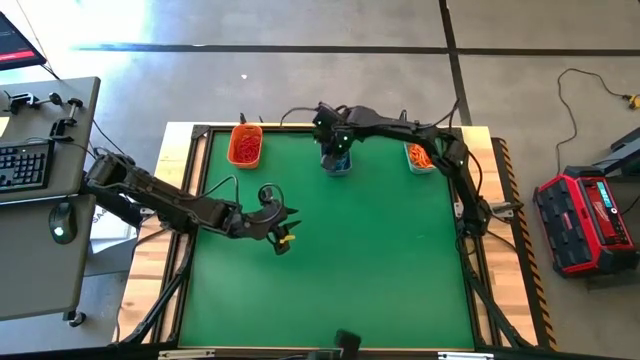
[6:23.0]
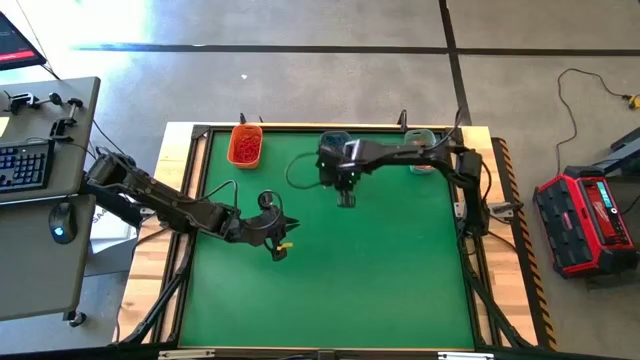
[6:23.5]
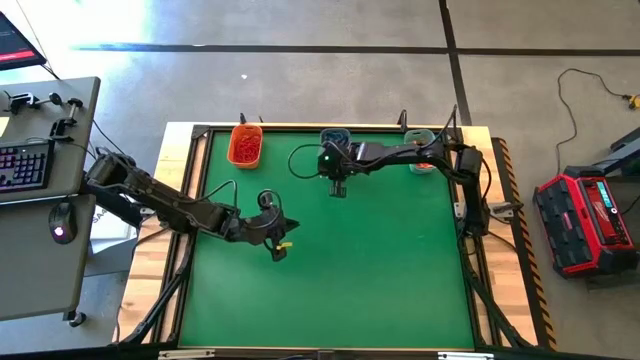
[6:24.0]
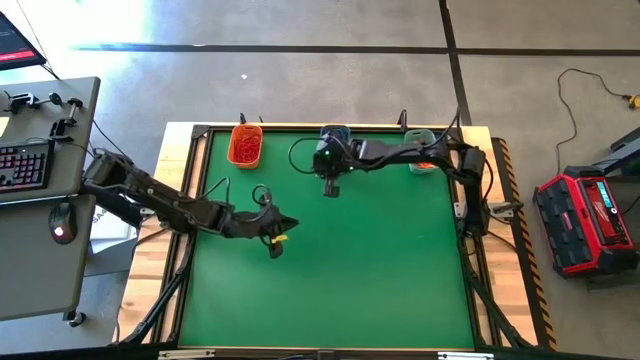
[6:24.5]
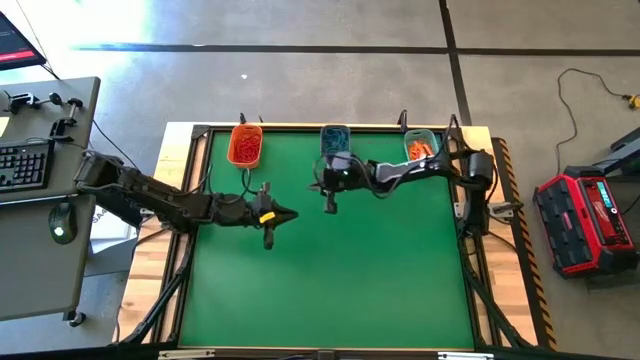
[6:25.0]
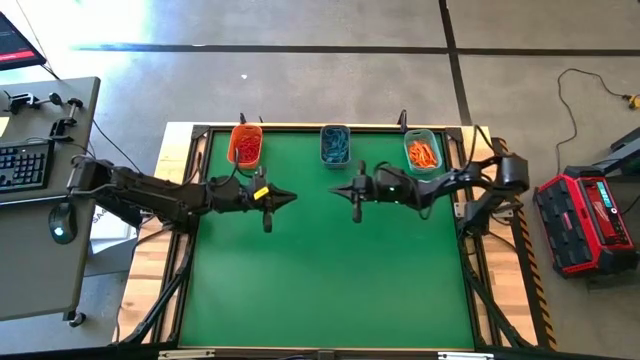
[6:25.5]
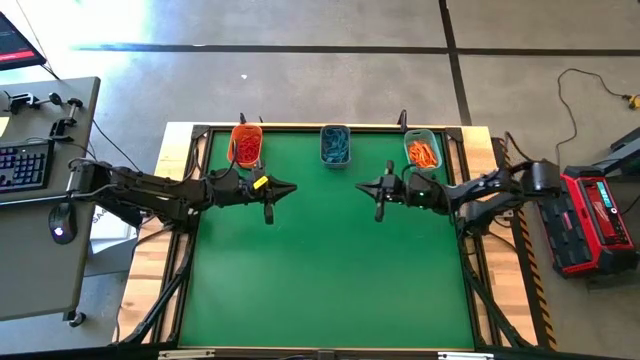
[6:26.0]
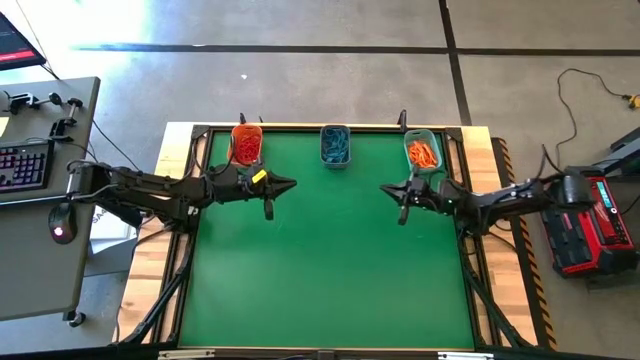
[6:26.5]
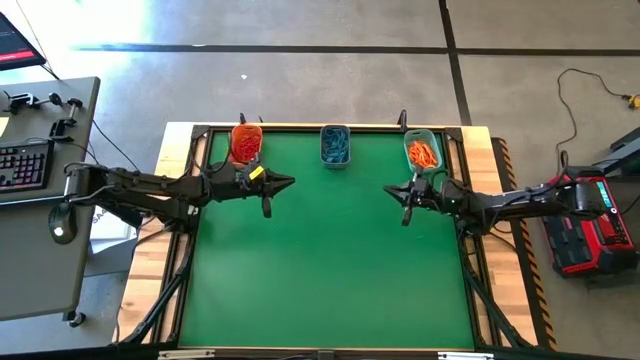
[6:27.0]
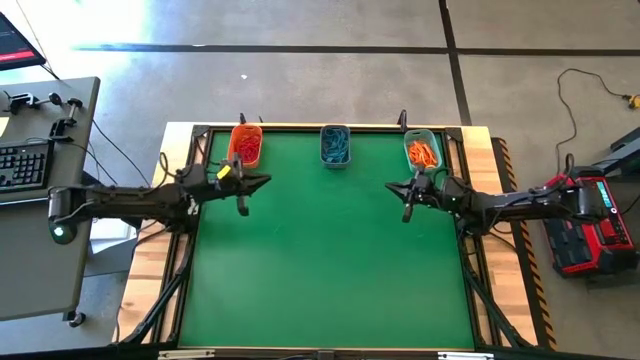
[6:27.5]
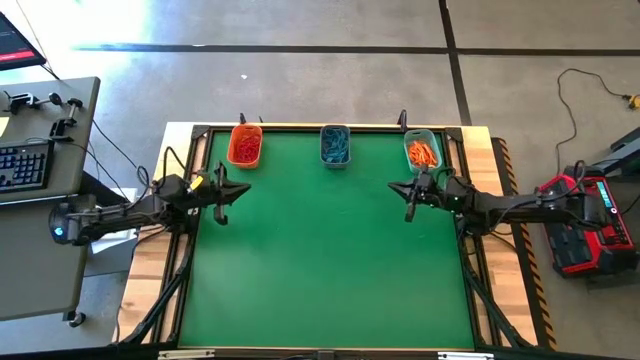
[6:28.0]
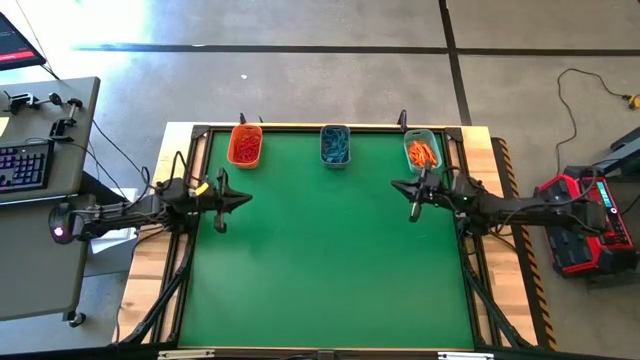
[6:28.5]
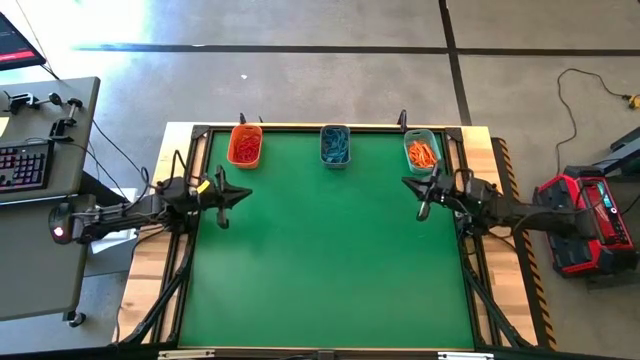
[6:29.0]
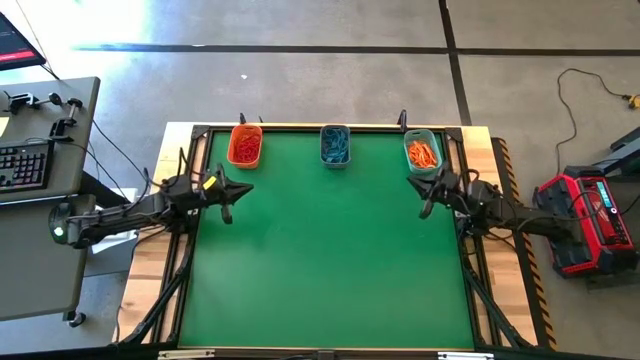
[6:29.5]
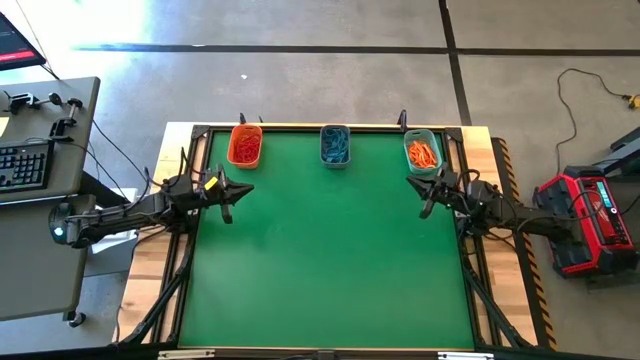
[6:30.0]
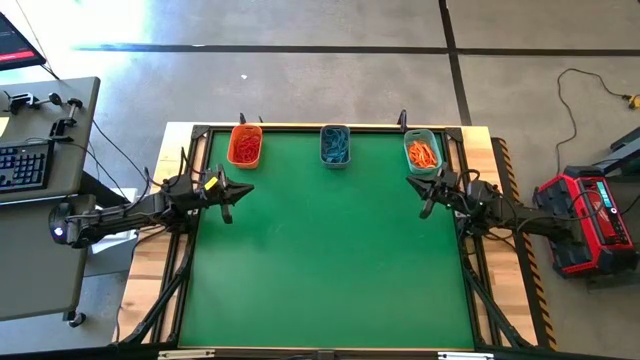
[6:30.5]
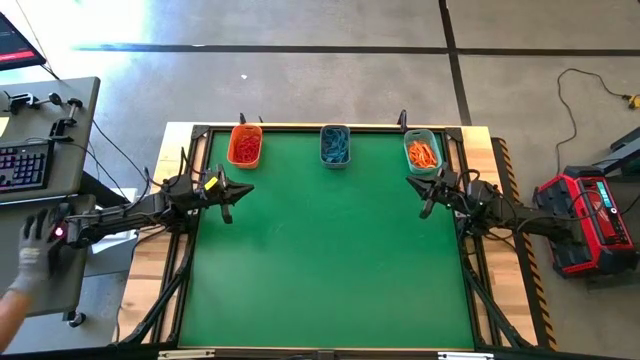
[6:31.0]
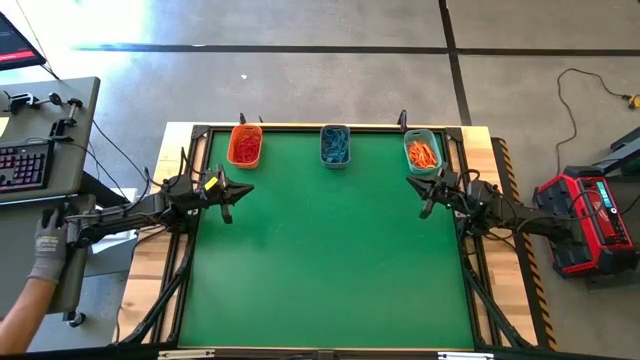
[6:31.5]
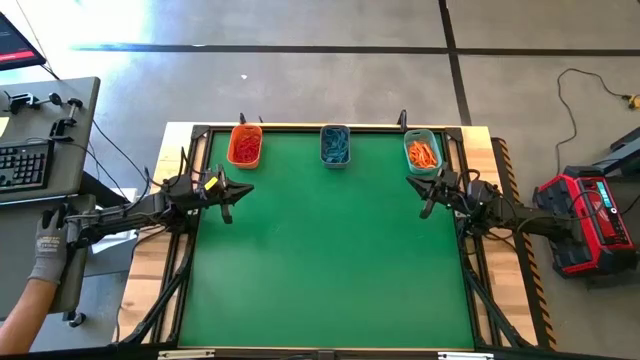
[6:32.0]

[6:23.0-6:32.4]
Task: Sort rubber bands into baskets
Return to Home Position

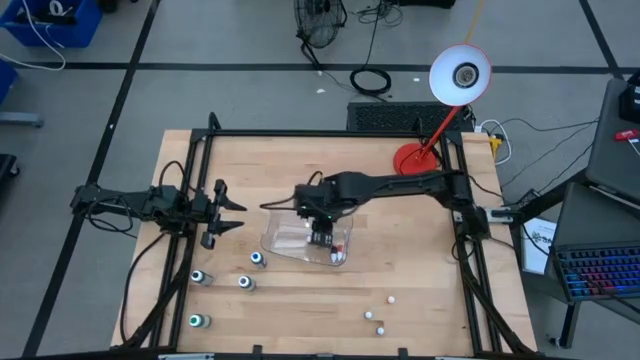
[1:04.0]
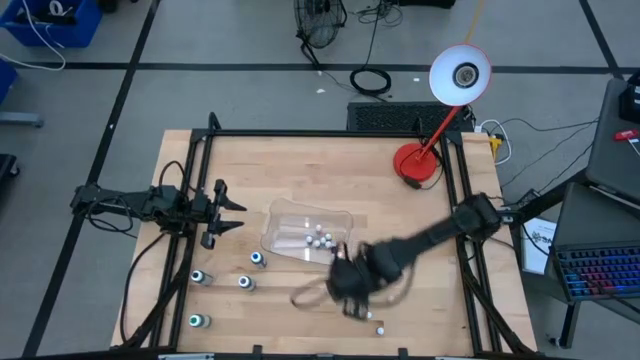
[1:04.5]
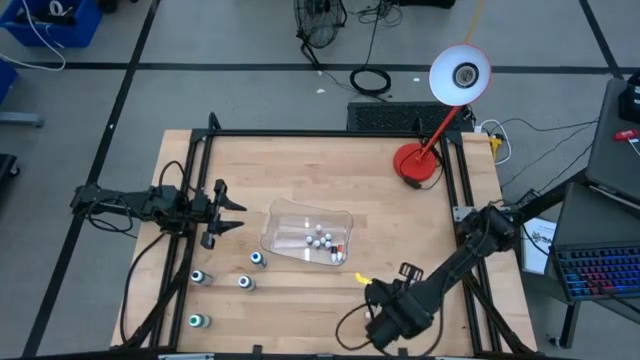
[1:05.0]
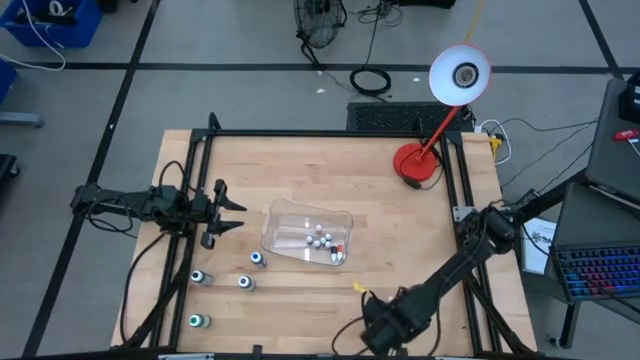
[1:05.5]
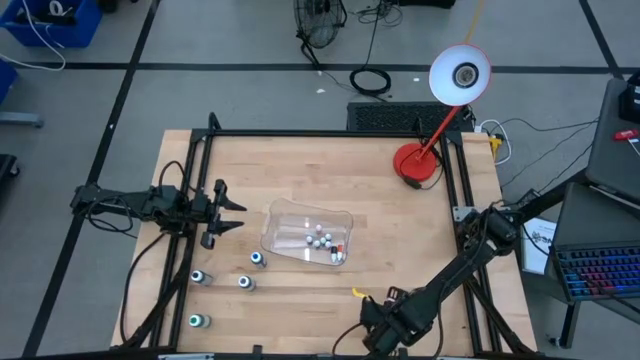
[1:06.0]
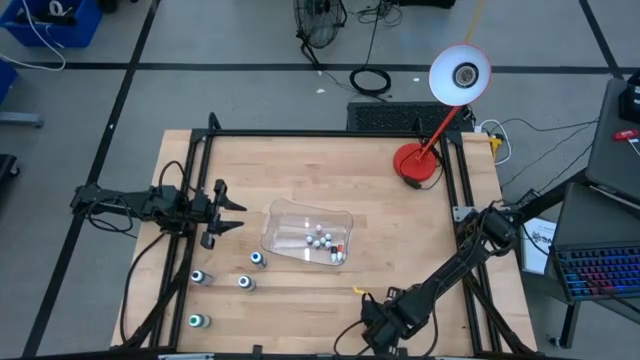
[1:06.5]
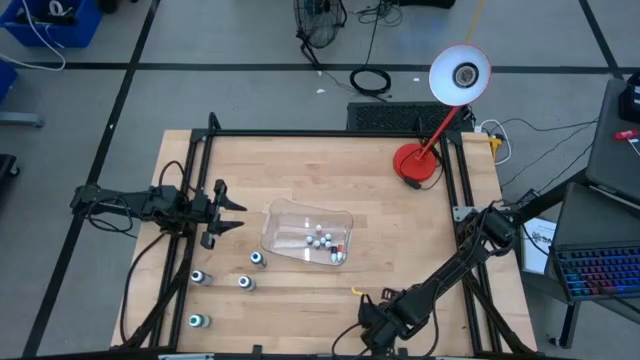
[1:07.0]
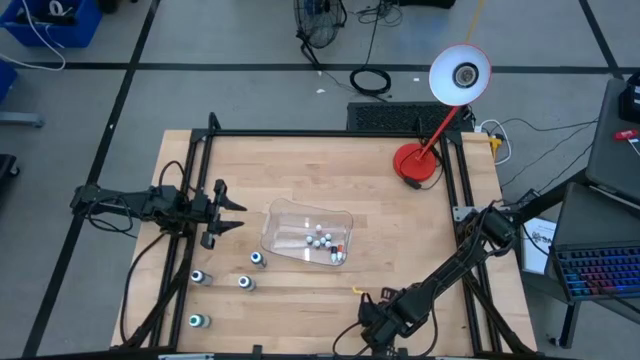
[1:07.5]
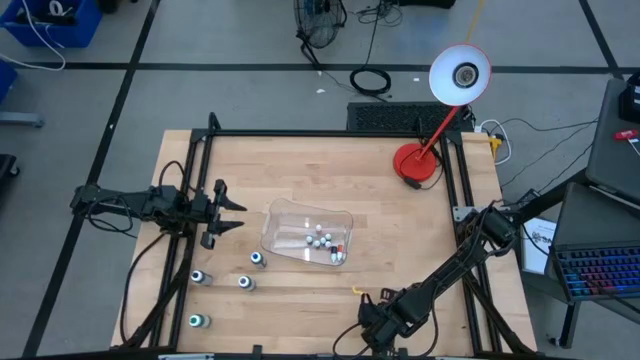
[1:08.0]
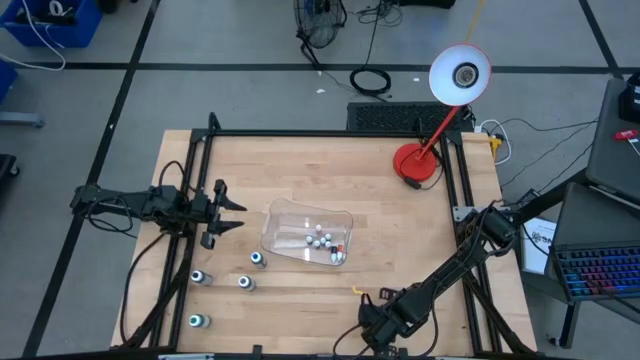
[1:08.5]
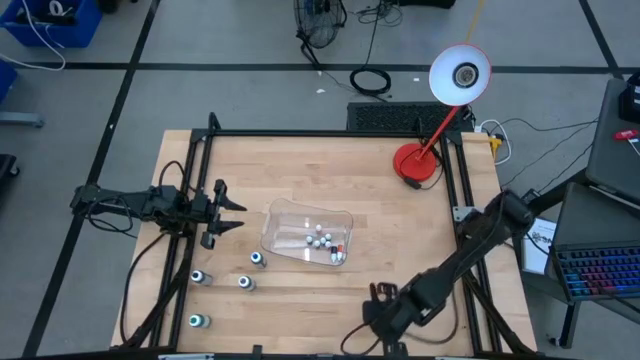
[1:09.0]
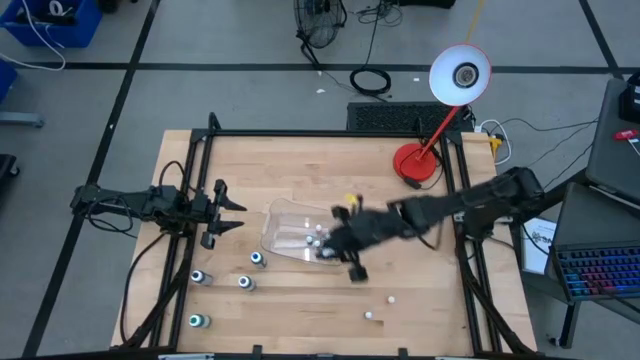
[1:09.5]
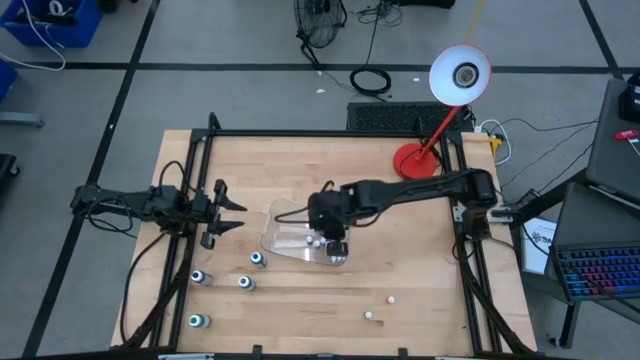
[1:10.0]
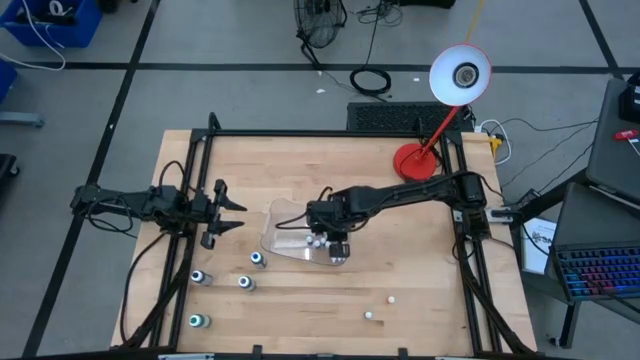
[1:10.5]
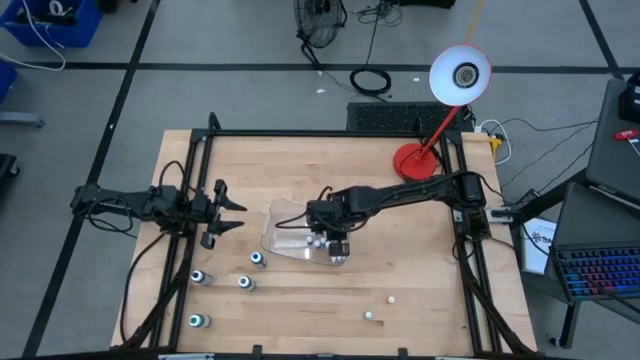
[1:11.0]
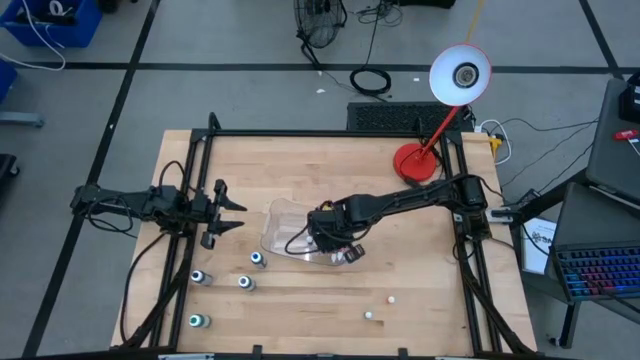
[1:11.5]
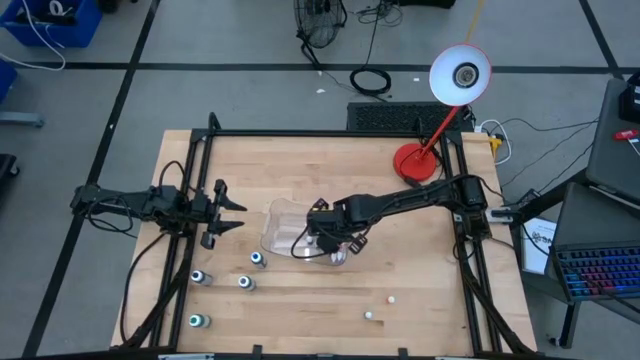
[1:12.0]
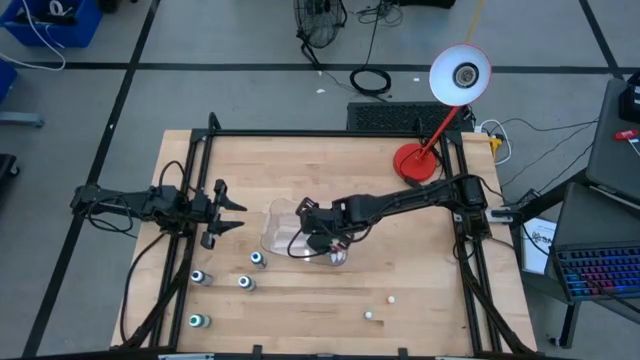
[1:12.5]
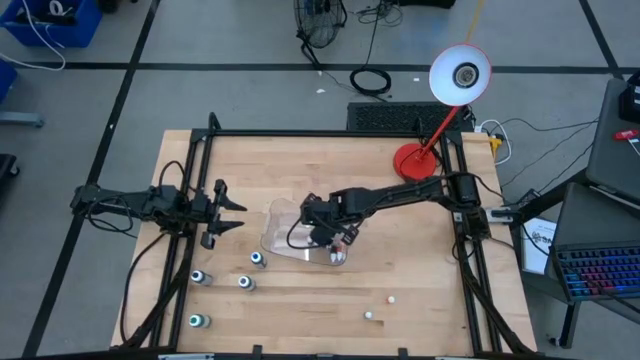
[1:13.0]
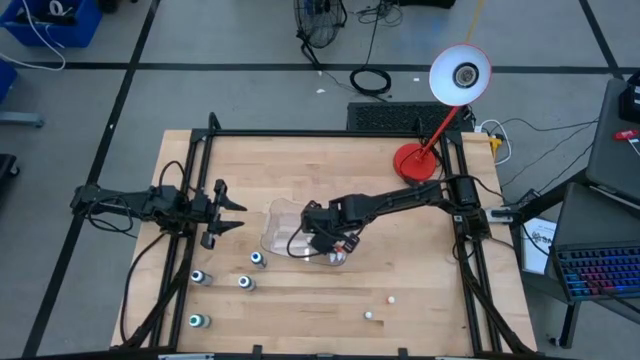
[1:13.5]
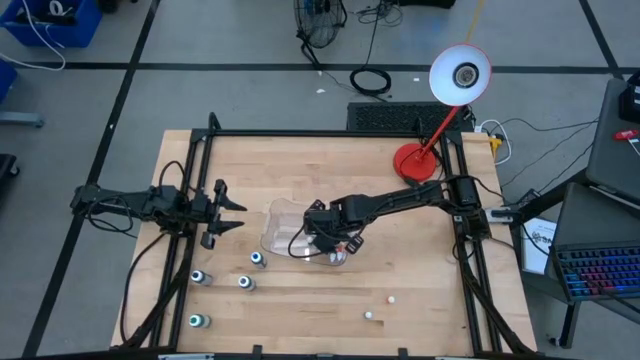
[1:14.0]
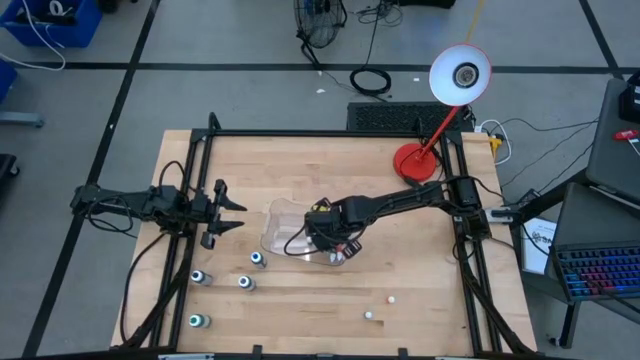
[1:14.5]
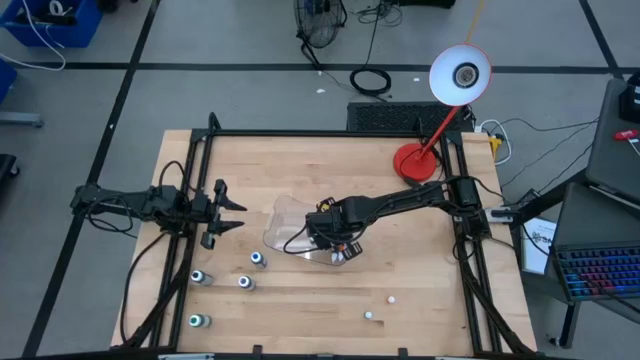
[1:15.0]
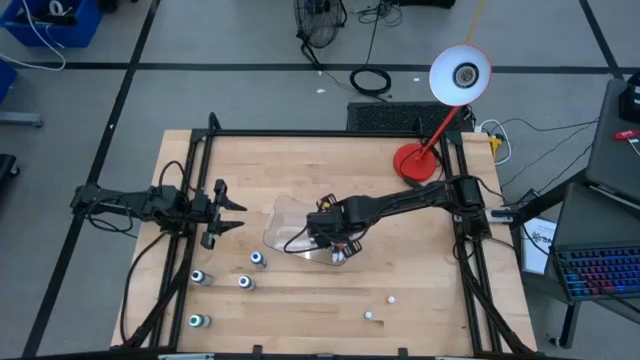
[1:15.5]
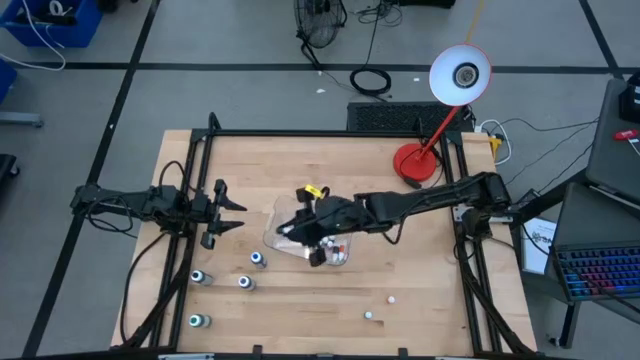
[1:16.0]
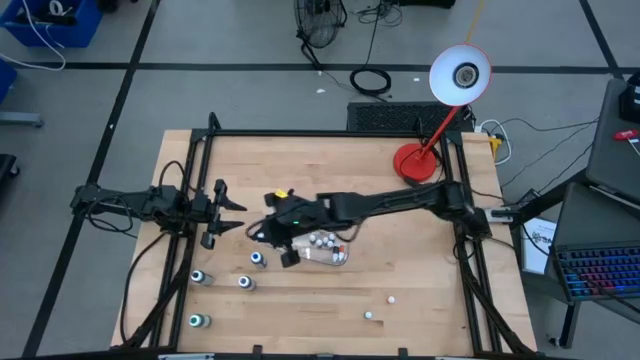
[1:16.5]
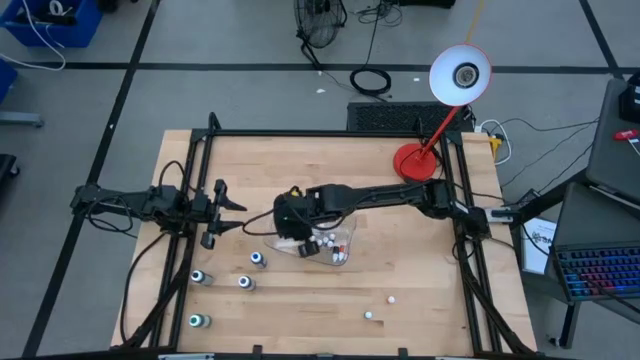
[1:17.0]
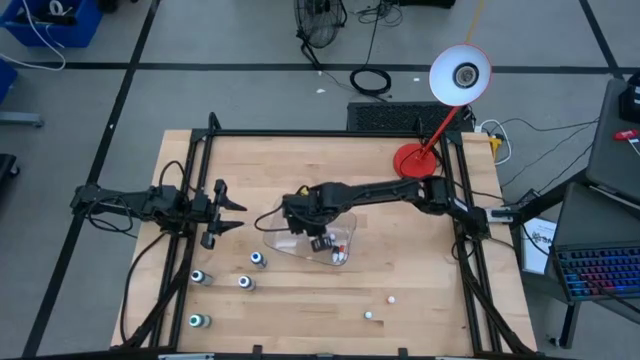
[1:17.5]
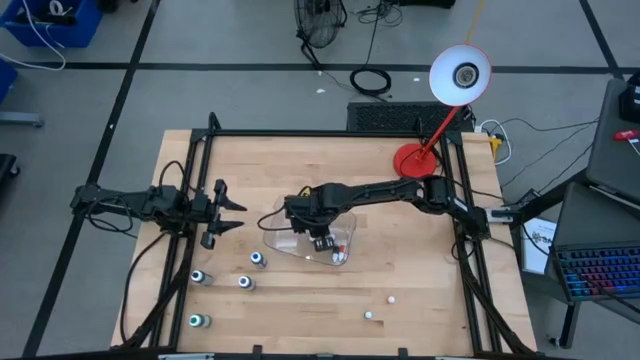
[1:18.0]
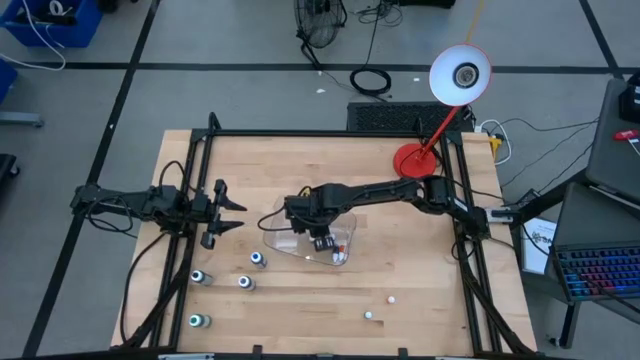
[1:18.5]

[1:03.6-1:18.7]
Task: Pick & Place food coloring
Put the small blue food coloring bottle into the transparent bin
